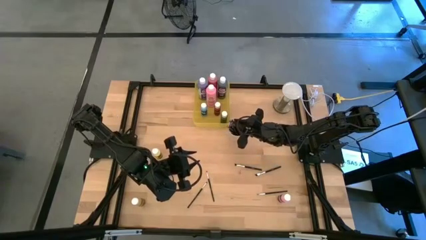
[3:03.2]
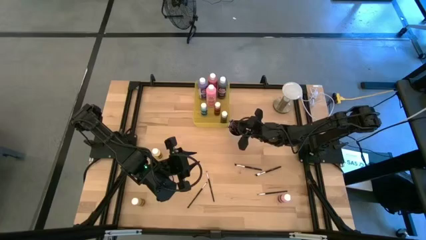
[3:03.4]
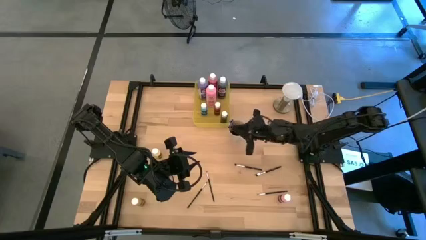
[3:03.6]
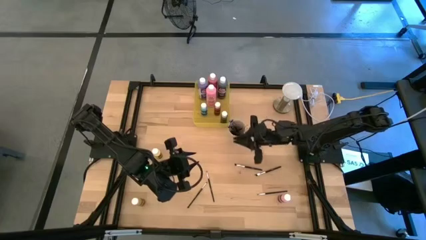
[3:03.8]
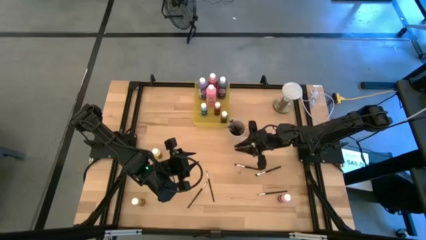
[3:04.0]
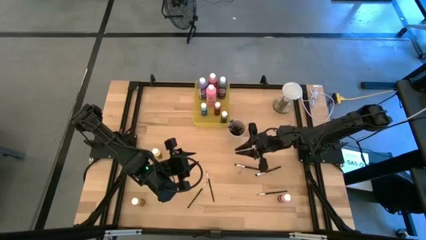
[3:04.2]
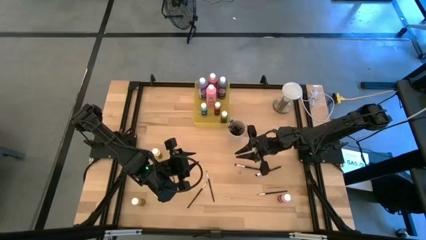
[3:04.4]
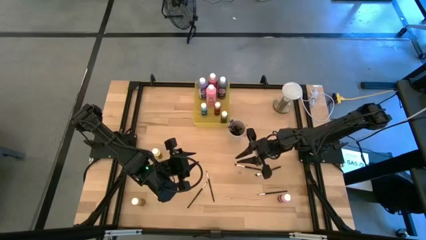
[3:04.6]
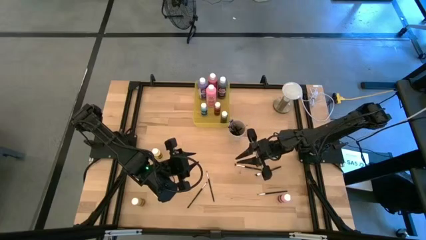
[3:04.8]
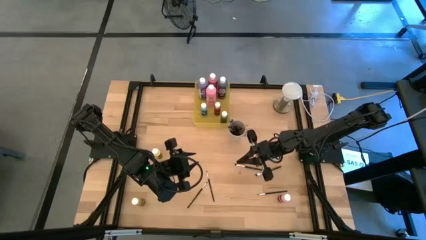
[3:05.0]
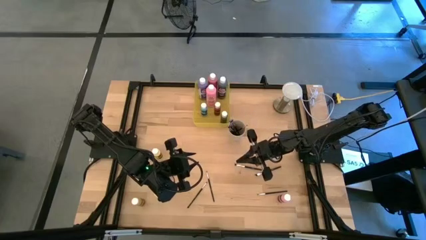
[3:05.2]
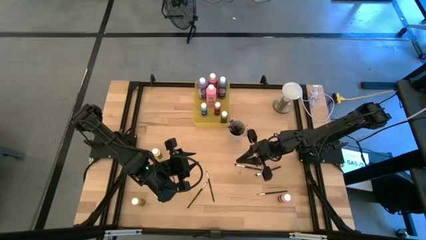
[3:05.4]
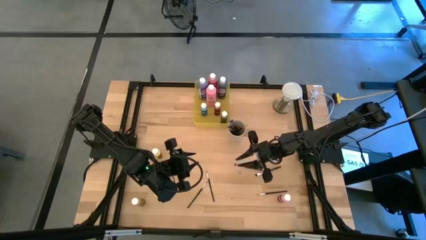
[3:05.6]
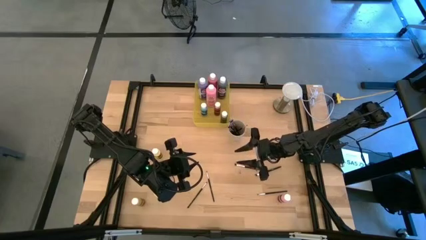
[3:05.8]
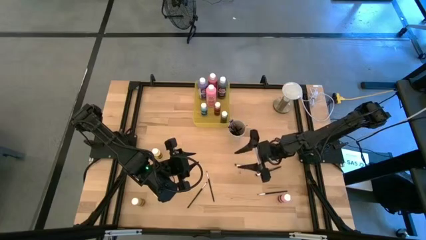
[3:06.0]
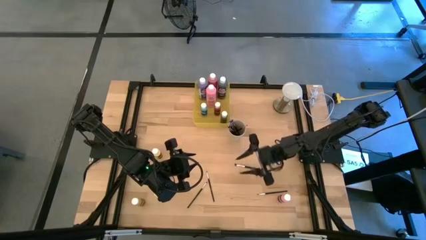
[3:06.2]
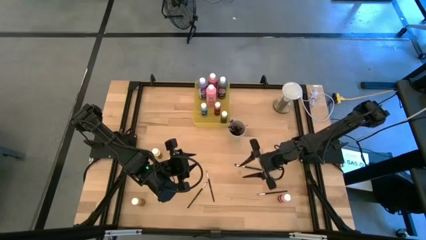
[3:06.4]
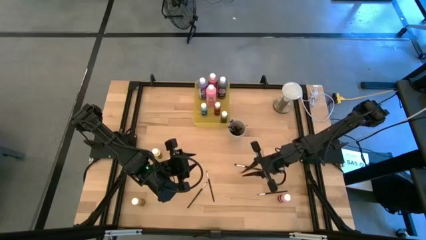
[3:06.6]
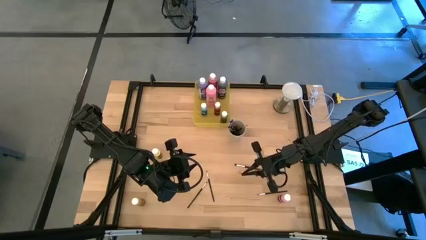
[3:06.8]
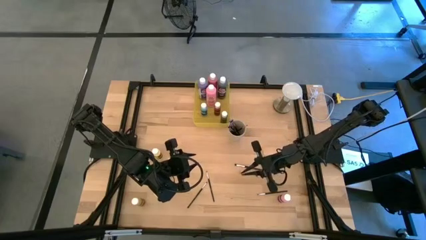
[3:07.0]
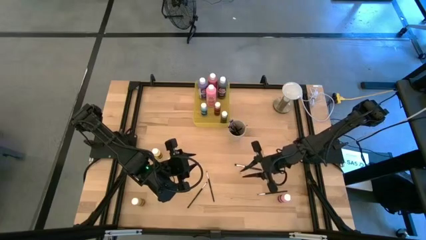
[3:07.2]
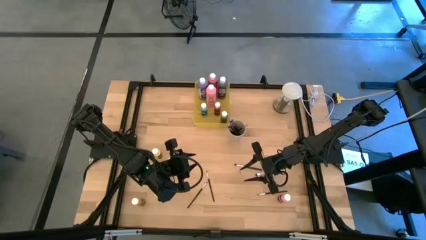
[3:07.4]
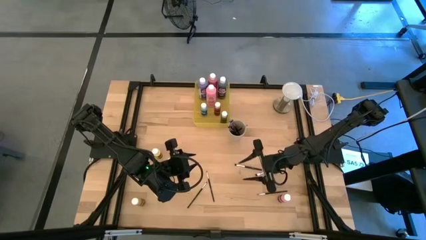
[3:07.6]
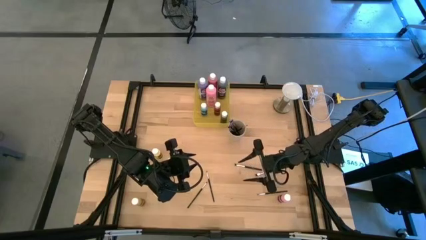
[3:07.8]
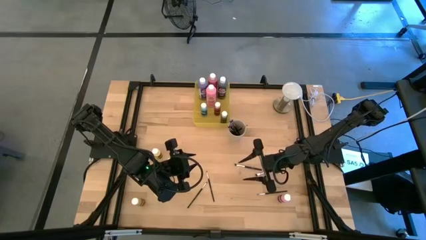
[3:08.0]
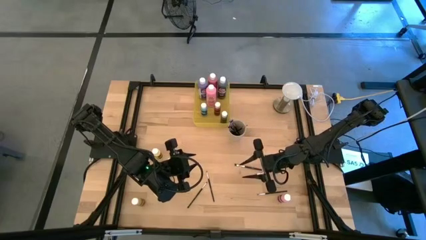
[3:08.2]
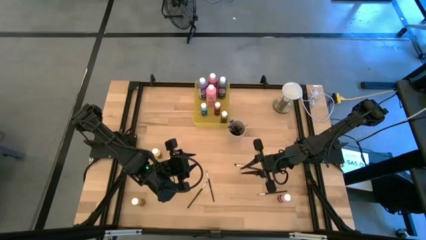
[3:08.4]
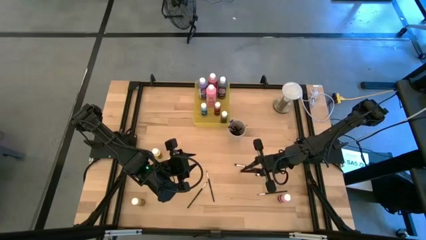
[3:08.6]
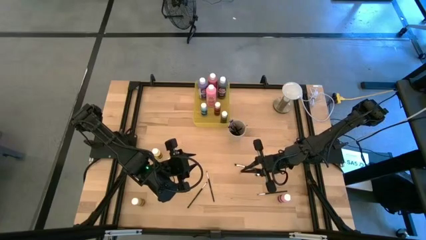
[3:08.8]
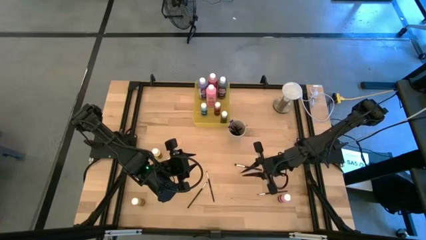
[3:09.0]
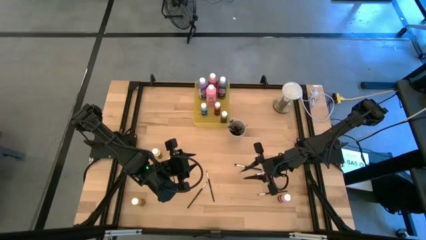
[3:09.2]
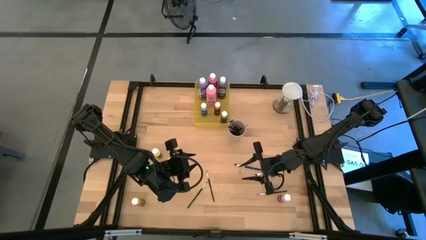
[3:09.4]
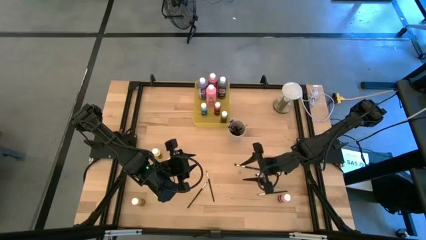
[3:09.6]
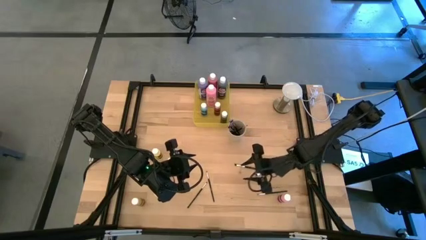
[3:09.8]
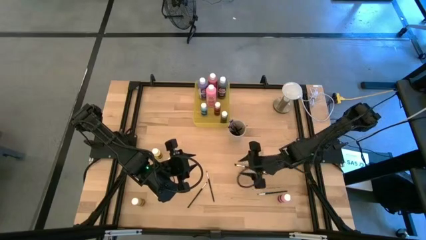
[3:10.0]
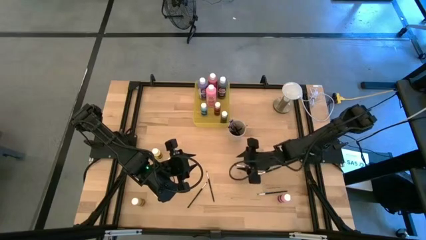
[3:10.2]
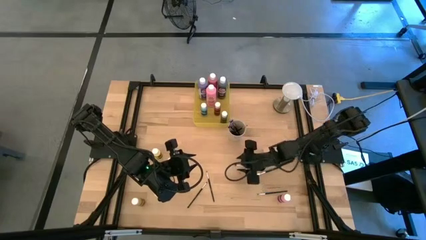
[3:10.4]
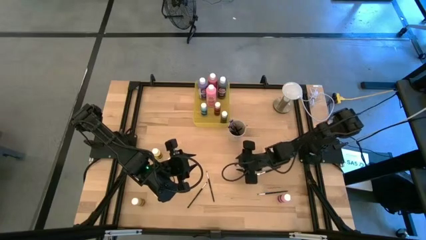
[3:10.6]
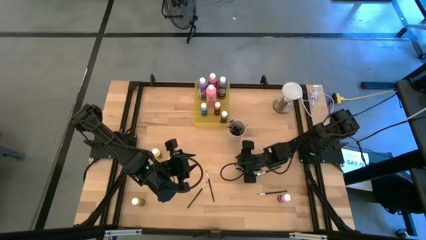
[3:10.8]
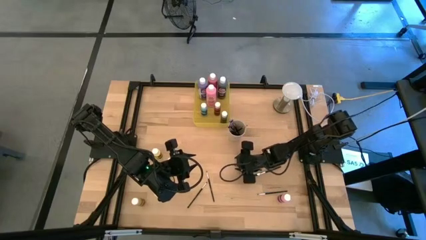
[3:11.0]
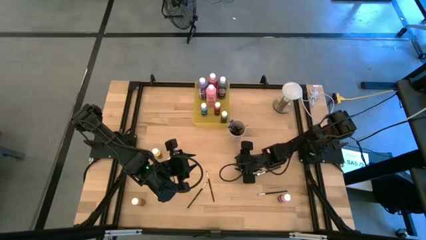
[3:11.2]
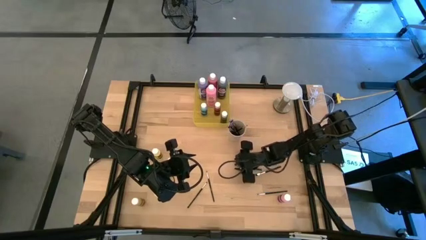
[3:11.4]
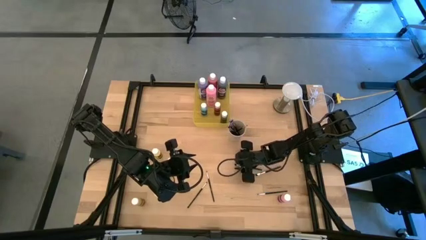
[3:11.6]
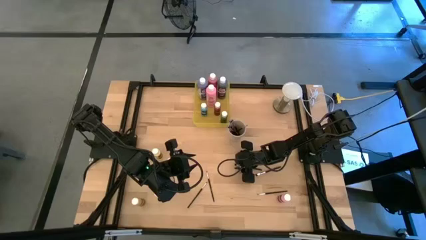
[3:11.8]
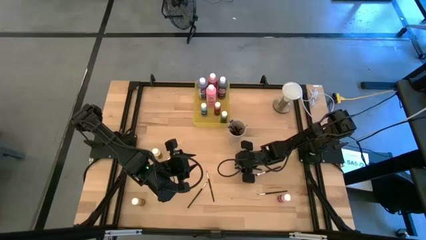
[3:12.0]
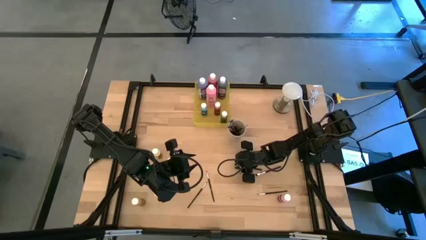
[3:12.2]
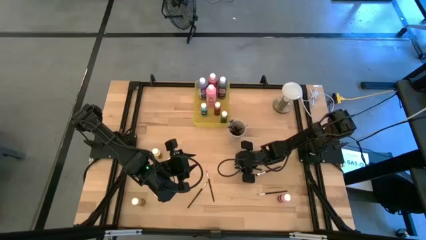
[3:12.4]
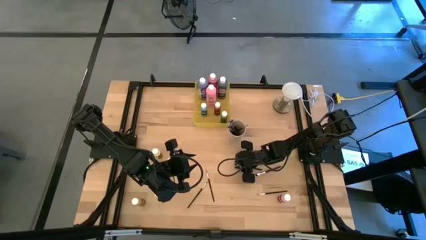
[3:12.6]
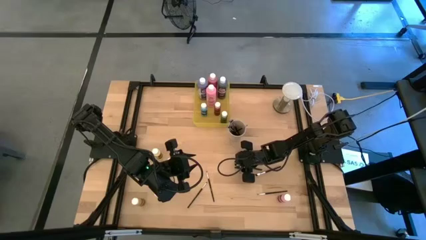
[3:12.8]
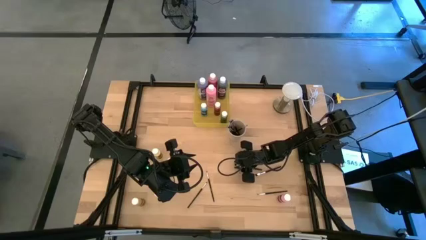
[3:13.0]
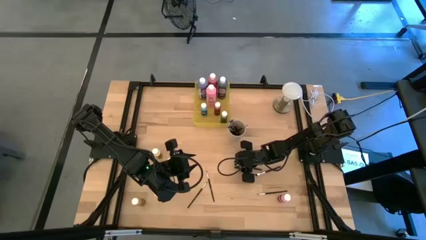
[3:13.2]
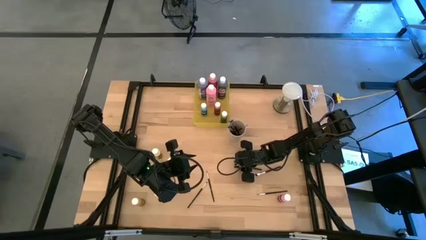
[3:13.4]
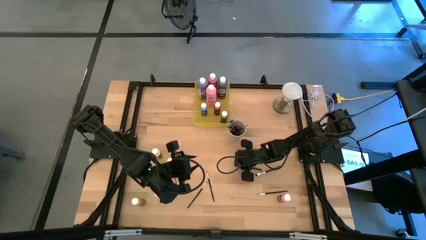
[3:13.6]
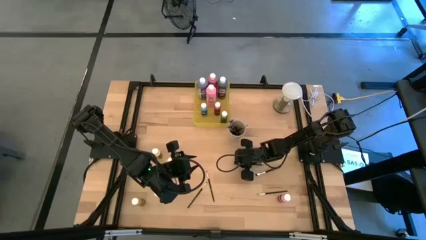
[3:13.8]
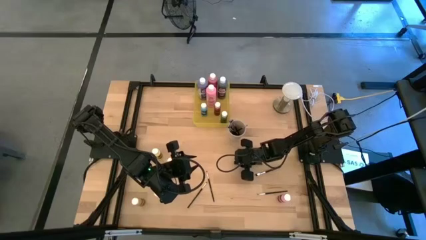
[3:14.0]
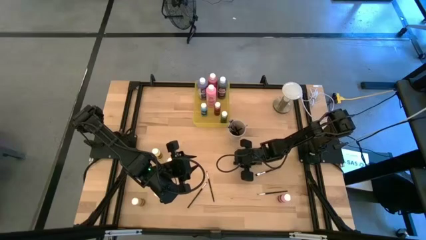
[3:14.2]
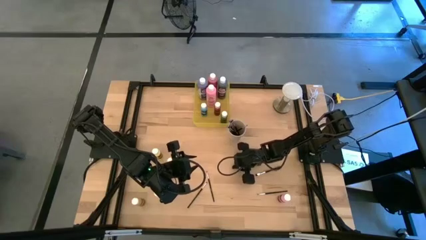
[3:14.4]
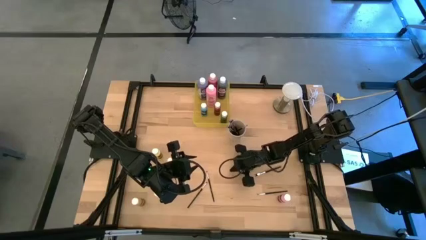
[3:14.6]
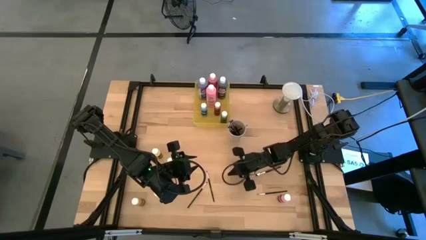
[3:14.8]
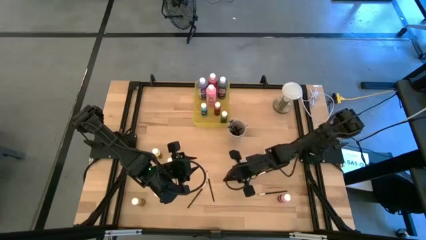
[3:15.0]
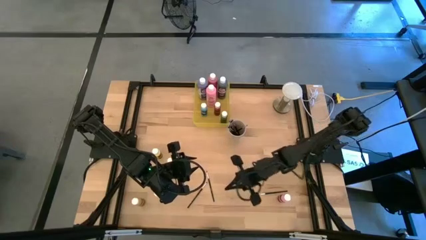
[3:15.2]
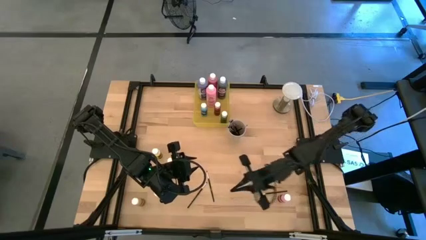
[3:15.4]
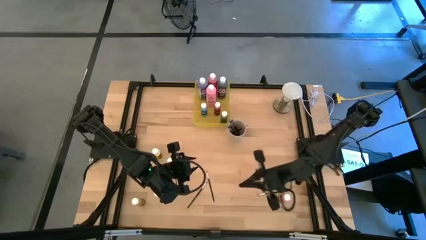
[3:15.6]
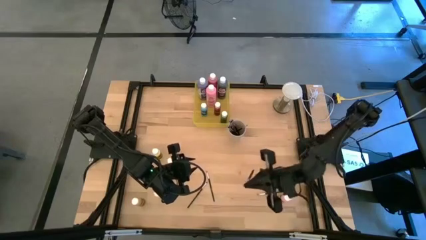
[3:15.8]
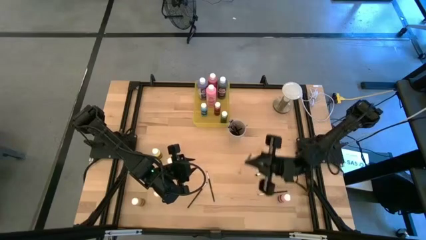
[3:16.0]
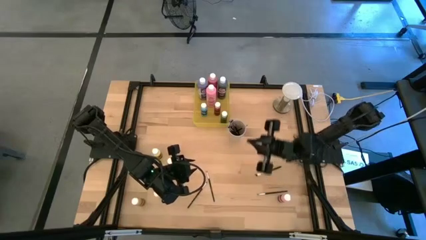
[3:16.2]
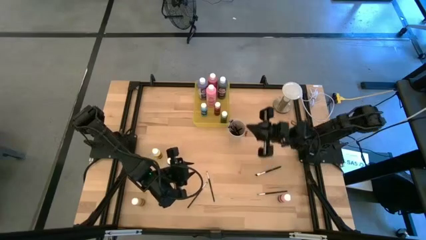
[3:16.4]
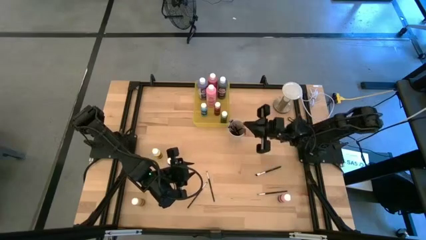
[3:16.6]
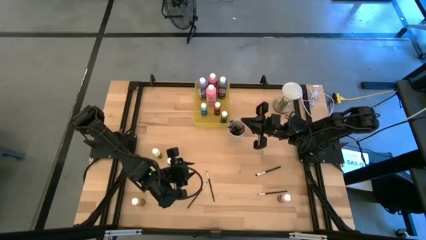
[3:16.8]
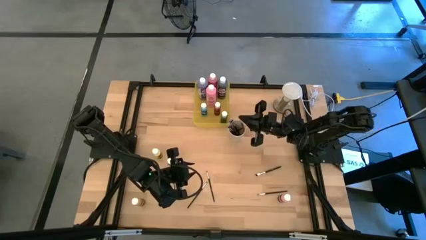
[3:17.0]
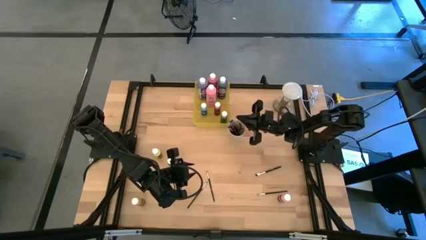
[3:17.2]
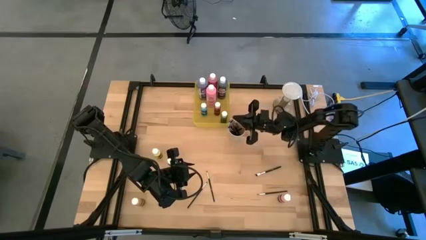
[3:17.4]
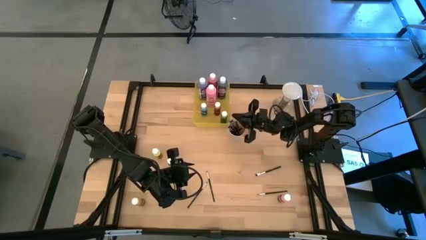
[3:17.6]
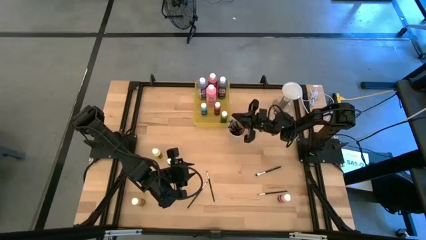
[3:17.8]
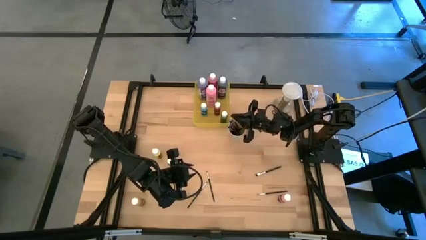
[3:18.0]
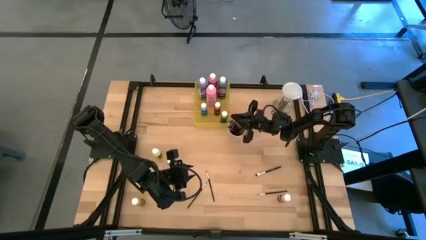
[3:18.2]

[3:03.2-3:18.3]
Task: Pick & Place Paint Supplies
Put the black paintbrush into the white cup

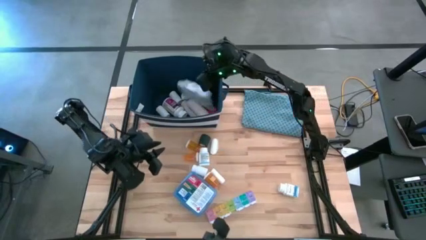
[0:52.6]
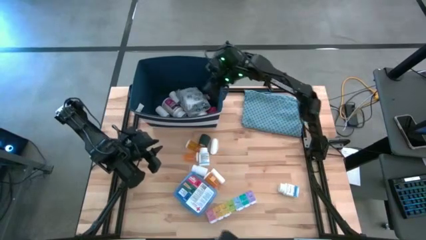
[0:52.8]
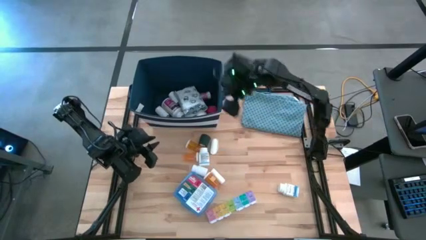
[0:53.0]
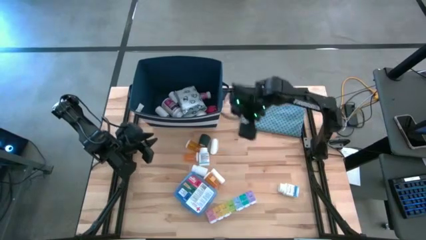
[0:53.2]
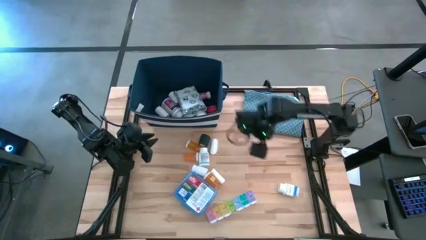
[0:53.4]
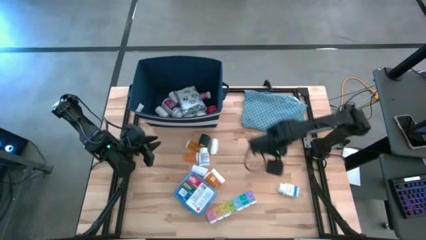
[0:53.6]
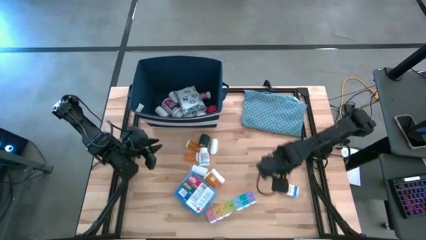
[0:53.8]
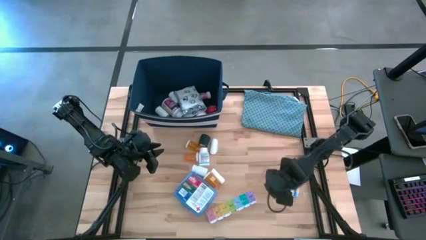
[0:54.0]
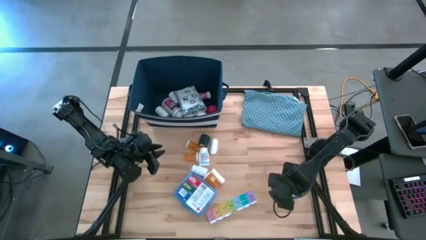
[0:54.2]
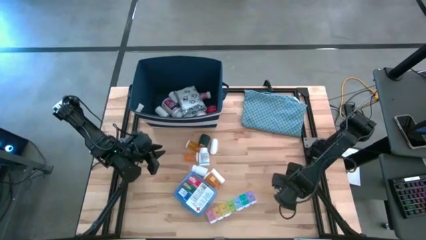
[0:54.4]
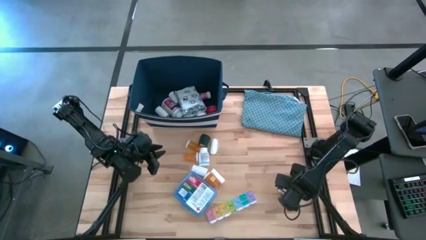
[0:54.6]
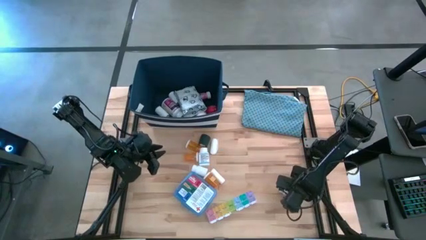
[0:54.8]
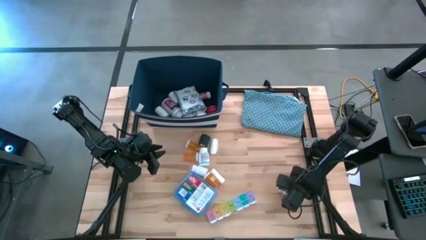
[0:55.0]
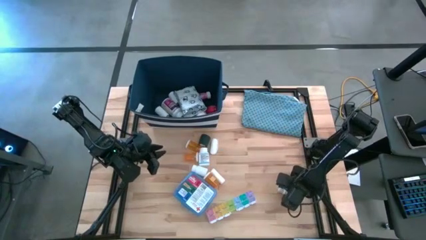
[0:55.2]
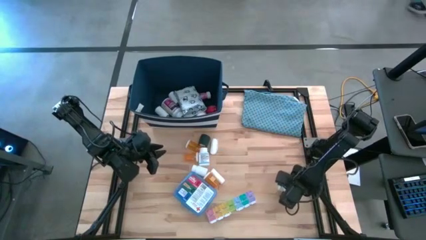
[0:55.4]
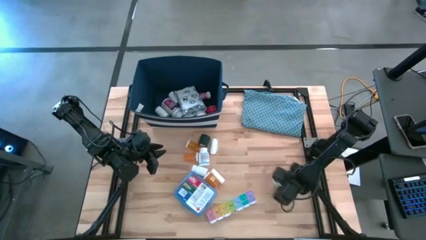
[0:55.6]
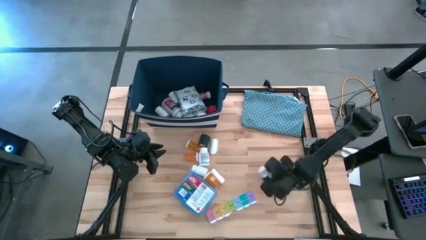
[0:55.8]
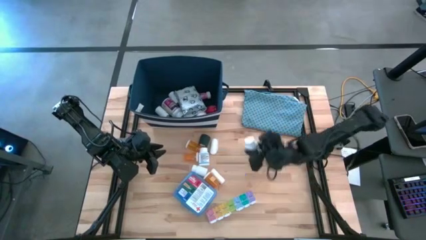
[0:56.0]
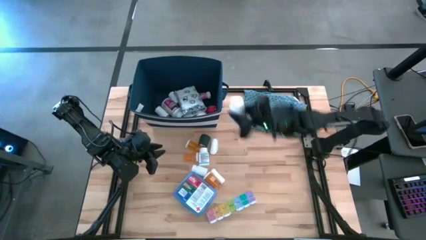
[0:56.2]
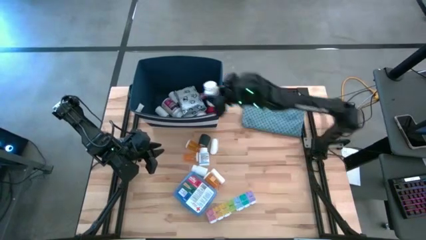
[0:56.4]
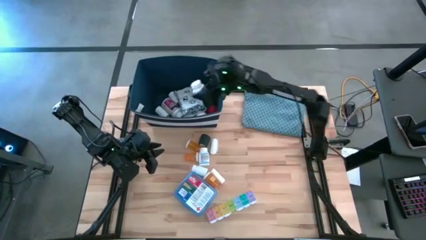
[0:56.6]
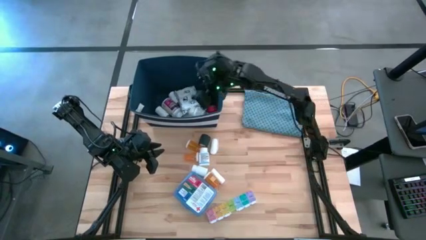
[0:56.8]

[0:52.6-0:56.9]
Task: Pick & place medical supplies in basket/bin
Put the white and blue pill bottle into the blue bin
